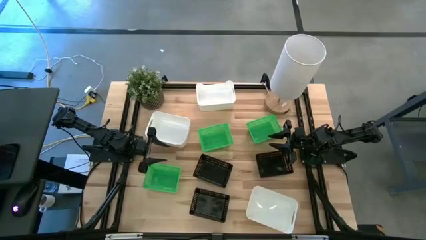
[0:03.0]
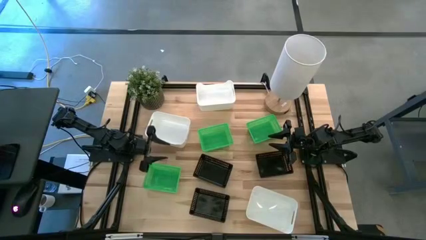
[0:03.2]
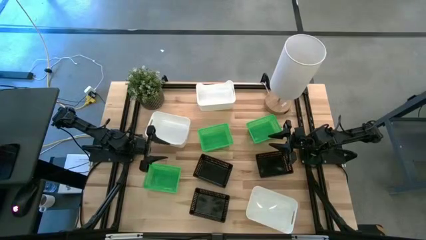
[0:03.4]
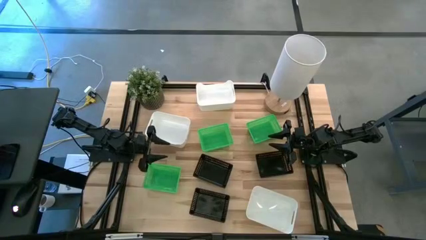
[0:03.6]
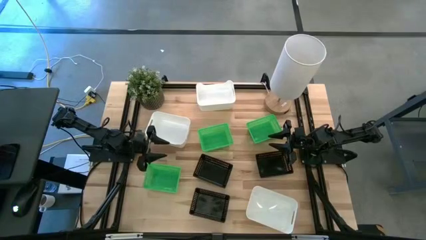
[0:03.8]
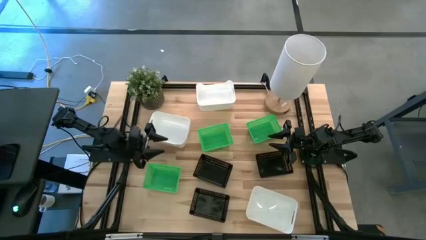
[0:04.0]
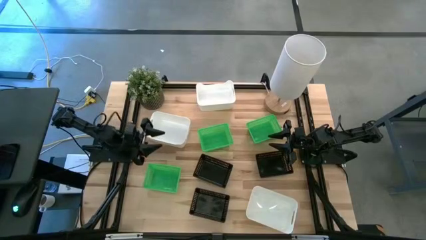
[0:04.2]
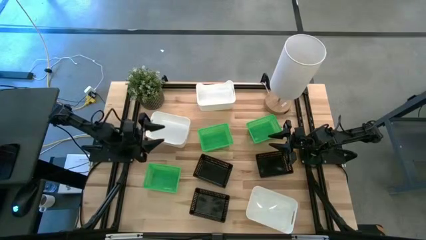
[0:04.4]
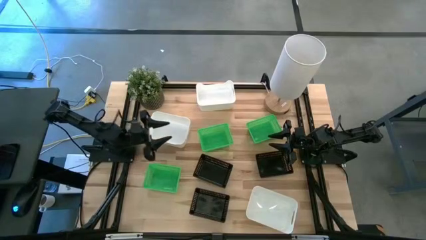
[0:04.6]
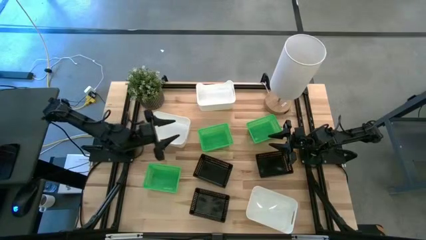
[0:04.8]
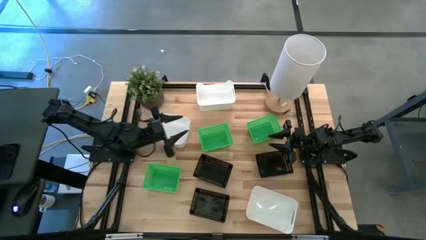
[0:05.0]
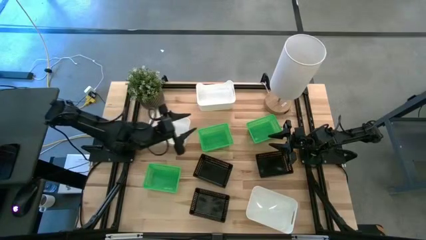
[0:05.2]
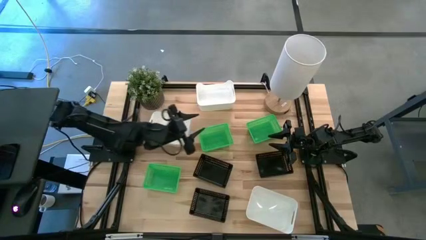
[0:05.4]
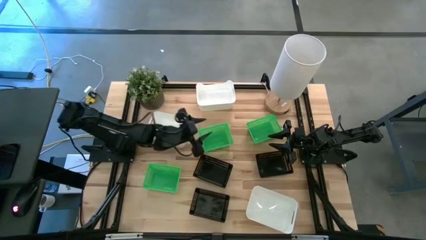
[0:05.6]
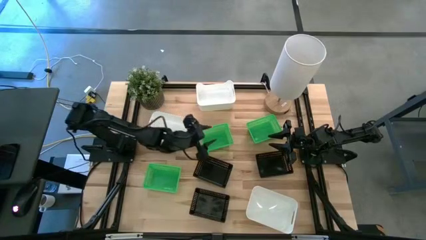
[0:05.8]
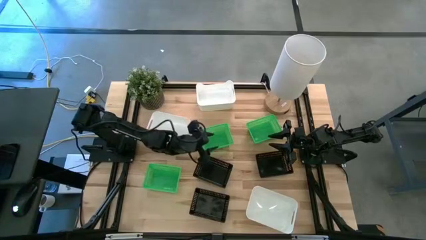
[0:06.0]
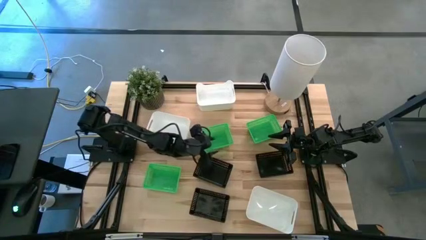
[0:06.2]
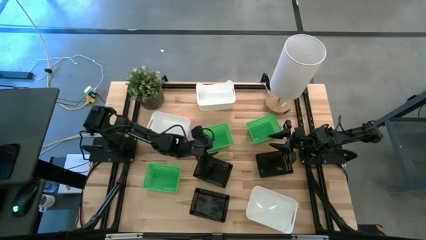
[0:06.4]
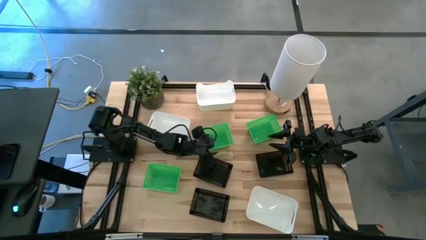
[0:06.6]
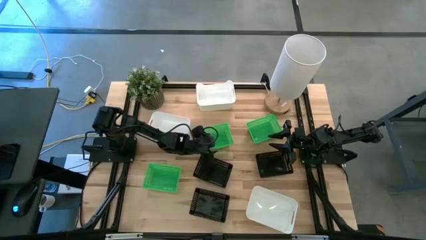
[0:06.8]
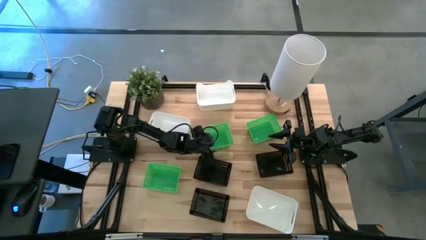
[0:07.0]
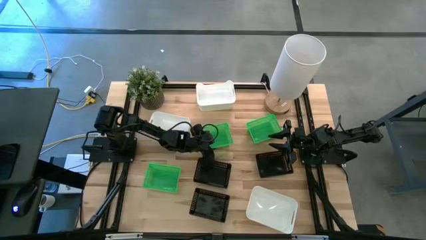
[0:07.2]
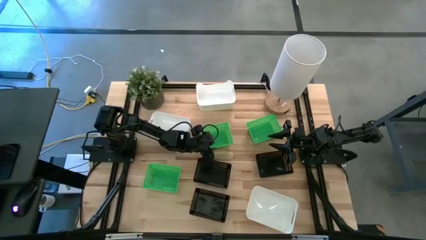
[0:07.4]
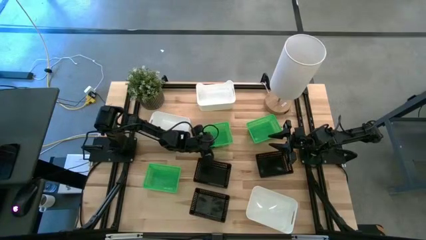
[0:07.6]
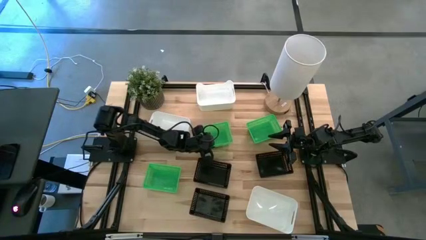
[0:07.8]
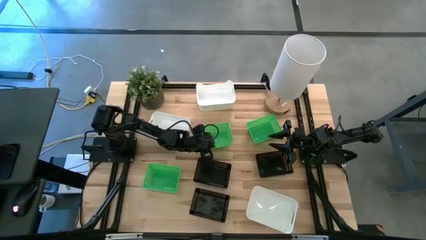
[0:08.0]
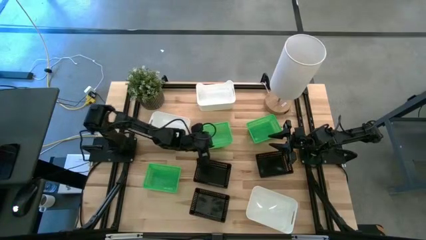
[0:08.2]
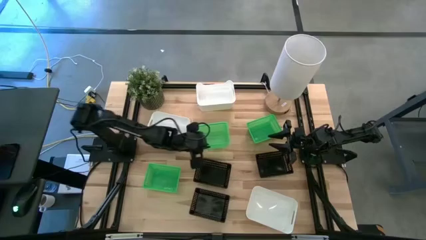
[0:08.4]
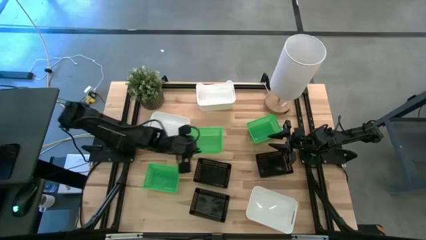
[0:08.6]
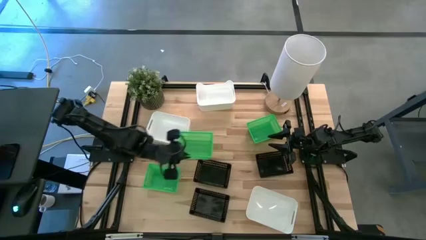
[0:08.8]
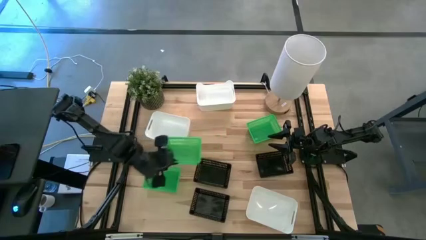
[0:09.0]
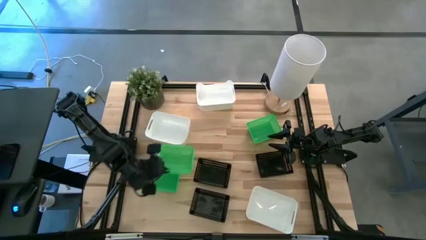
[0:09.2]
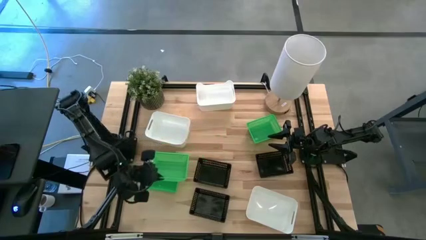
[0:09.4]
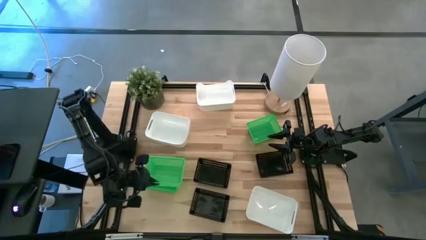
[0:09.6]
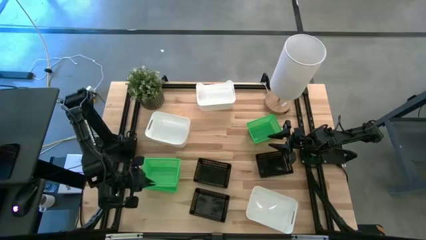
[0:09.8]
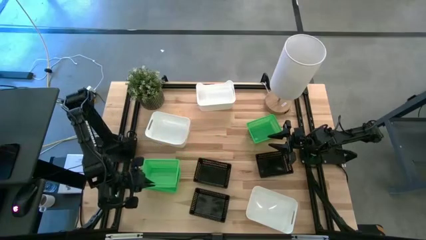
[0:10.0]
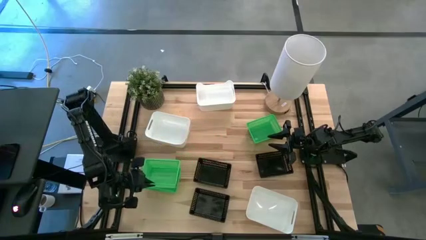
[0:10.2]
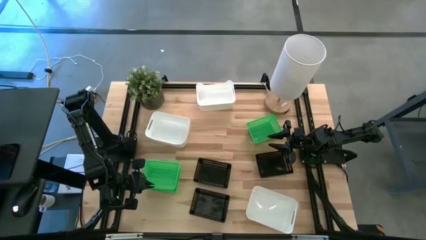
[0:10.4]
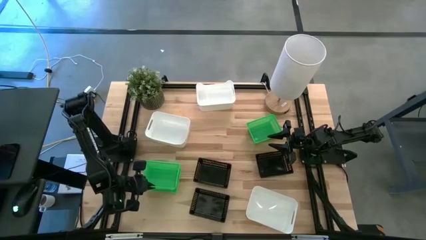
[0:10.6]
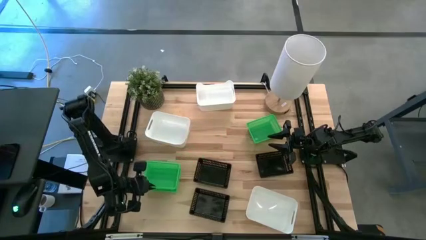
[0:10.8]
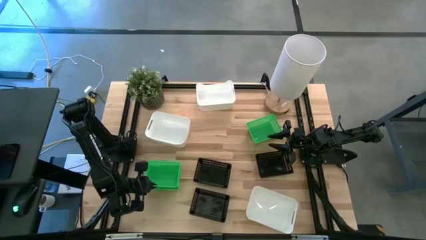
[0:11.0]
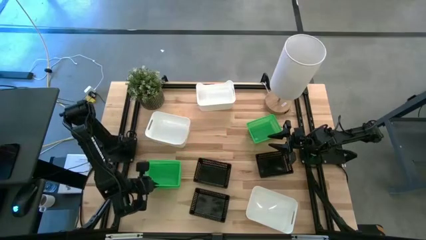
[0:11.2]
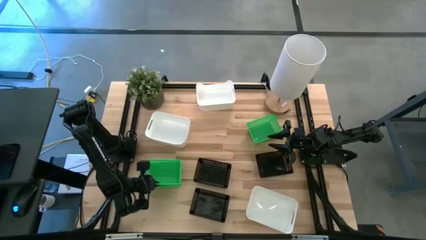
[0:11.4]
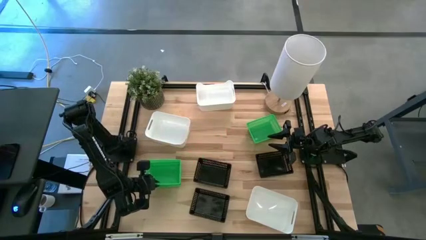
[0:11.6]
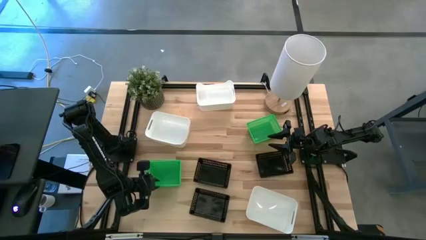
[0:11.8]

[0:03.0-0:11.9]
Stack the middle green bin on the bottom left green bin

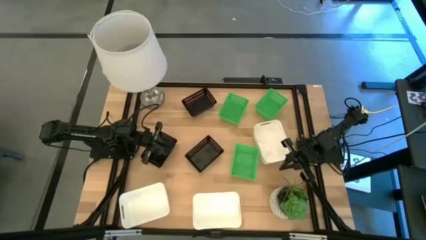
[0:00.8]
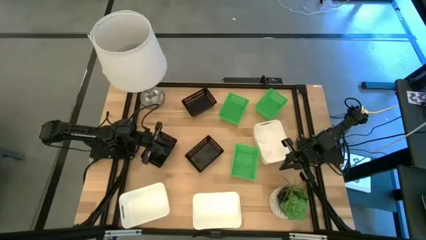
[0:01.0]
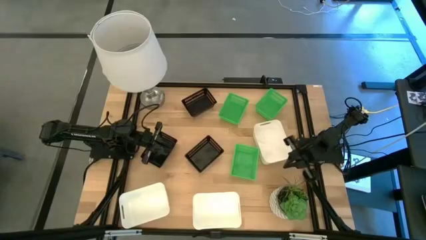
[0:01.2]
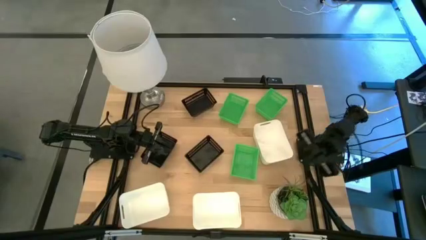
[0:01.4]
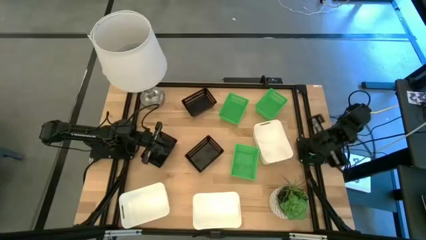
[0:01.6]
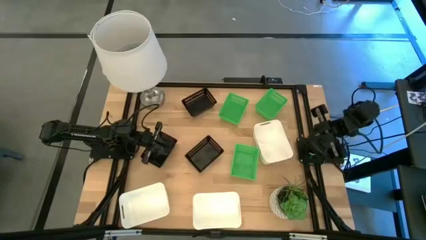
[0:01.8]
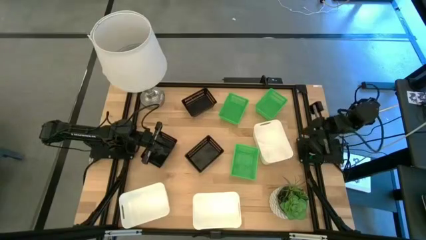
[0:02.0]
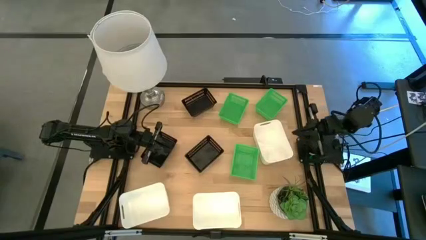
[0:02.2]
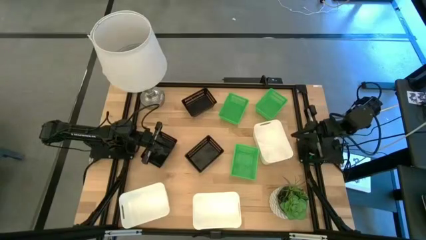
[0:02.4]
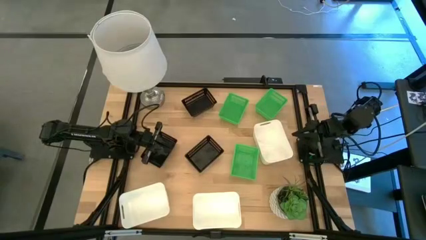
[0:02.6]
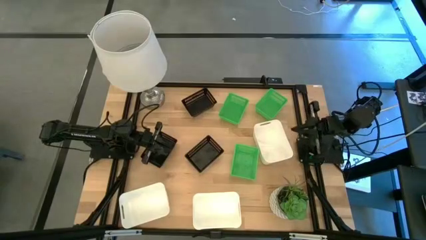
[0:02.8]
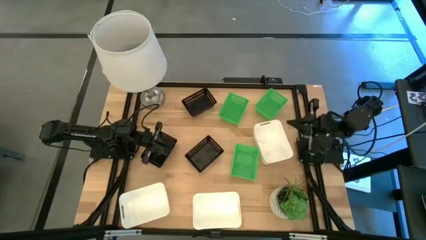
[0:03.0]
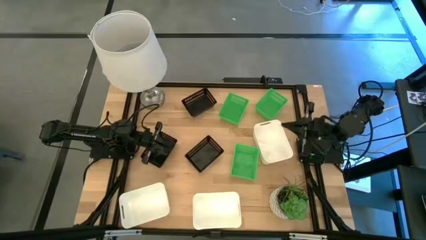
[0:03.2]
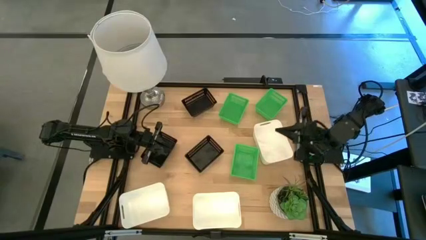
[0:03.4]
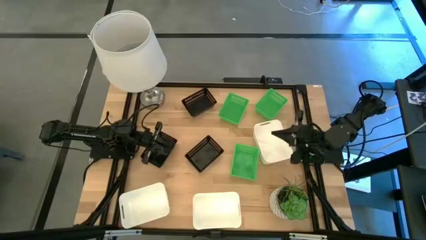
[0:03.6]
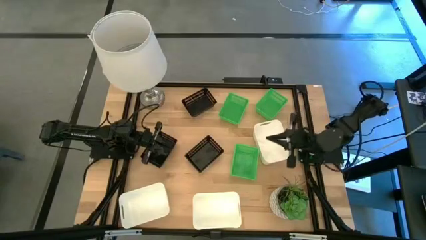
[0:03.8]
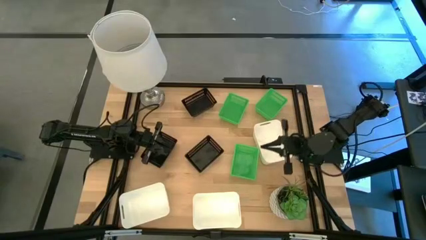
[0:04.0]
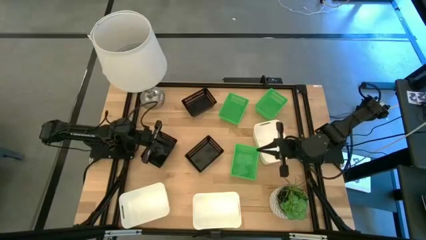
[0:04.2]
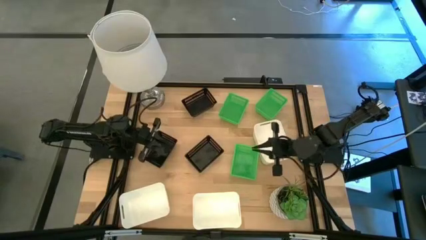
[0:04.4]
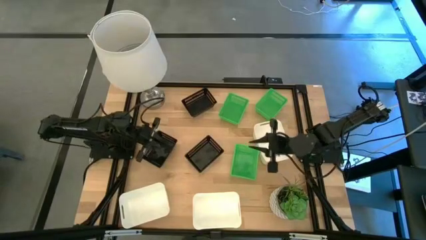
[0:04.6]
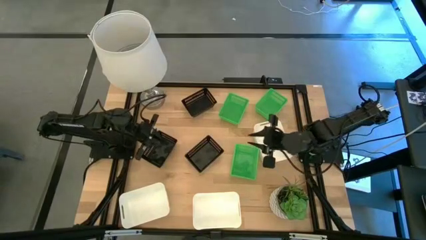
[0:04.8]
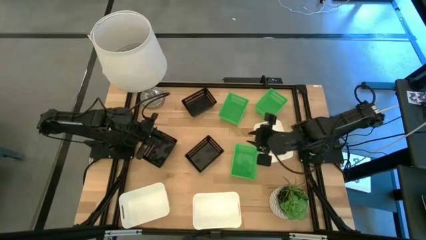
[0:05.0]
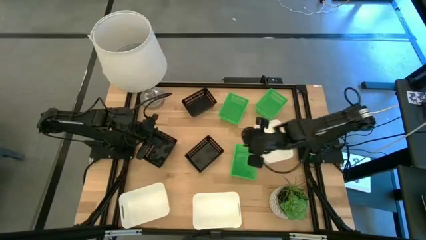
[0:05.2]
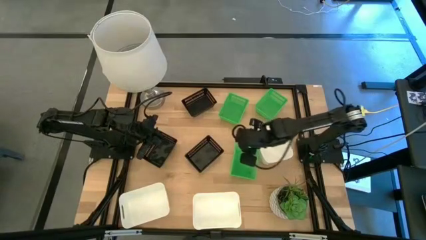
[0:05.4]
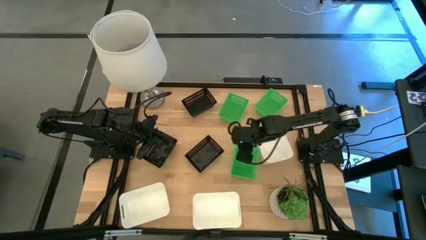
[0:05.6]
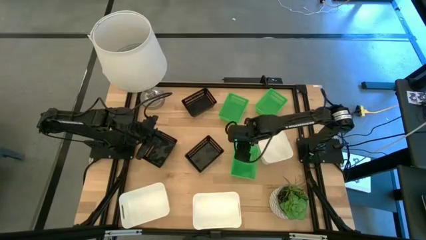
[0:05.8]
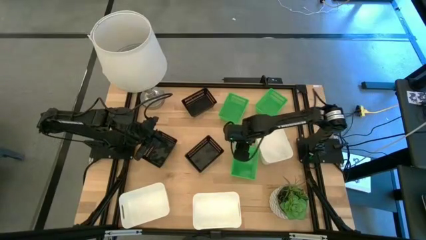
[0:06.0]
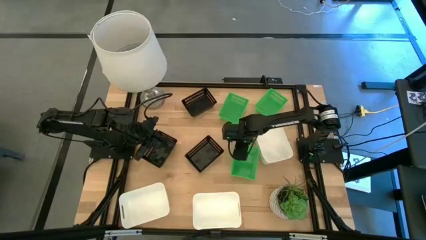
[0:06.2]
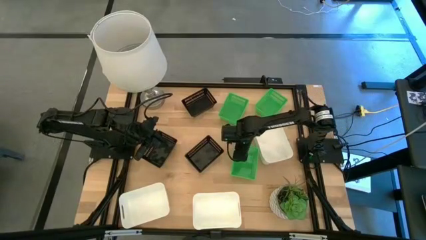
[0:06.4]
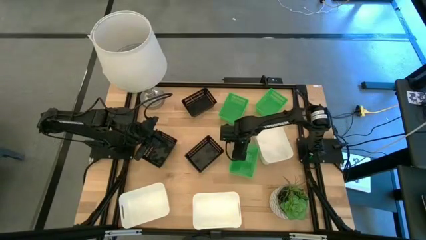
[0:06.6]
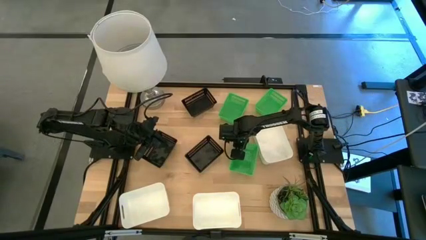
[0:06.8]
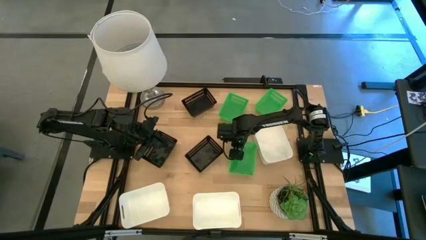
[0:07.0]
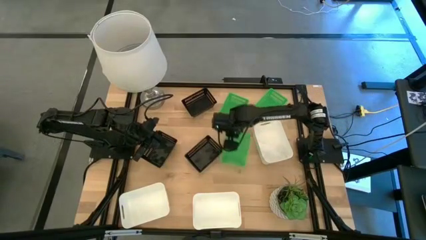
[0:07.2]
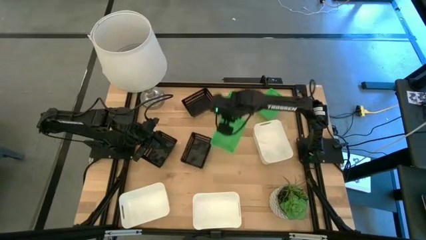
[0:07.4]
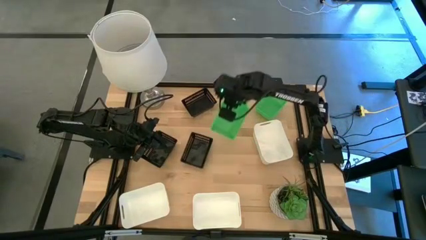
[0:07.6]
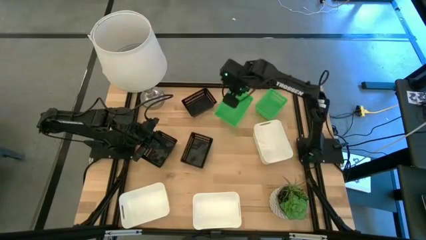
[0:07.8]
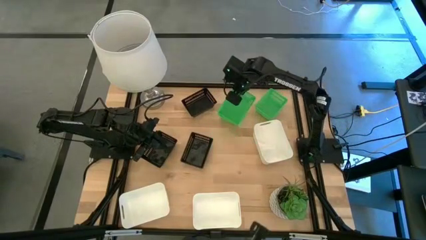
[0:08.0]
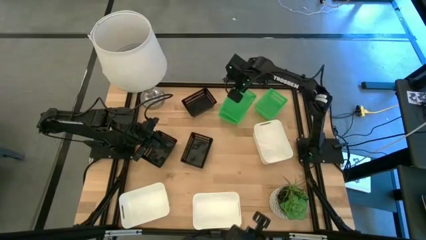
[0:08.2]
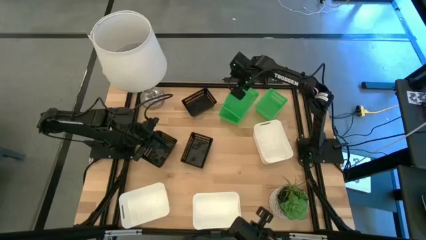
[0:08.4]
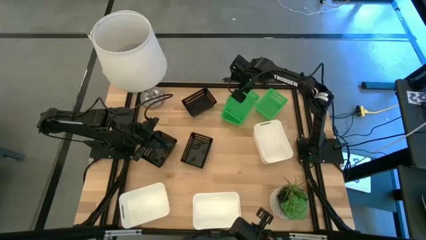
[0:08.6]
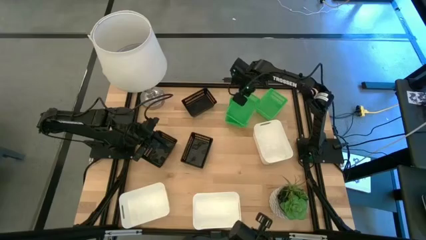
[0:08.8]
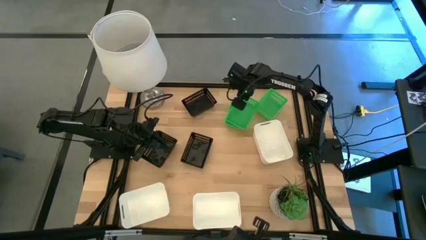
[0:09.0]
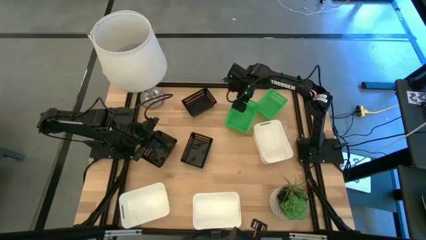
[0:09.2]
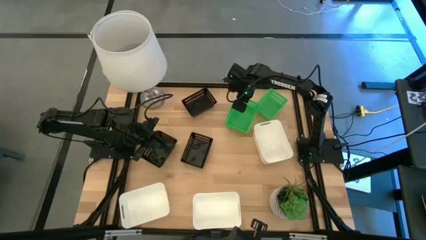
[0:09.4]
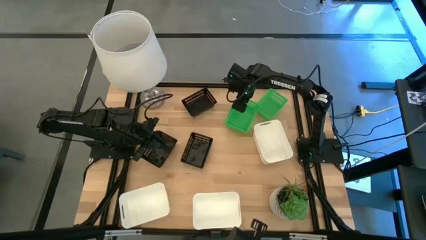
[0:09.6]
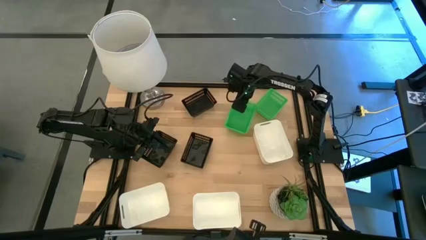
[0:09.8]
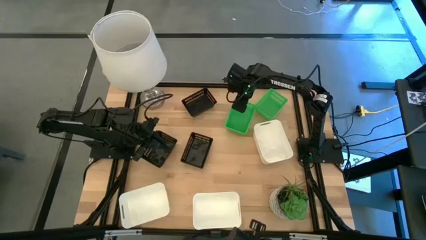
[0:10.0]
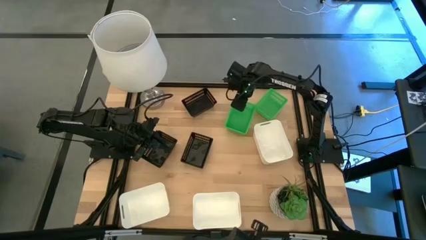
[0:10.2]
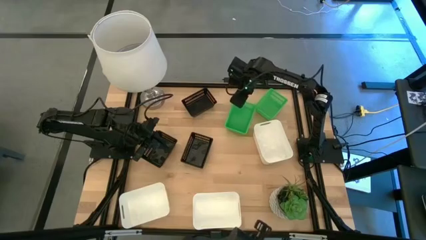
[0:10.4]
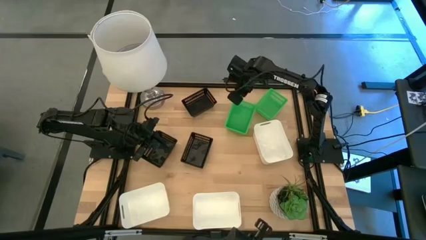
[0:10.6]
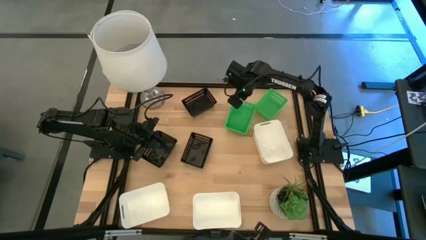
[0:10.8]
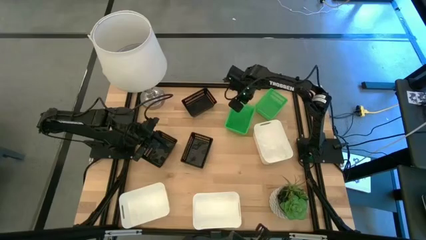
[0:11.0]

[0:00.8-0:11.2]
Stack the bottom left green bin on top of the top left green bin
